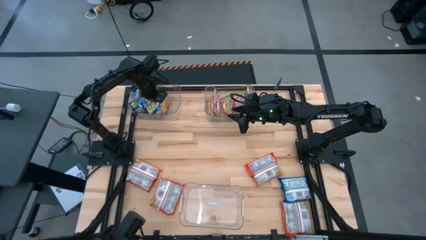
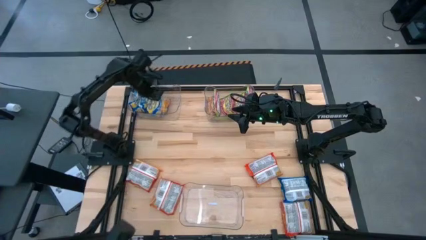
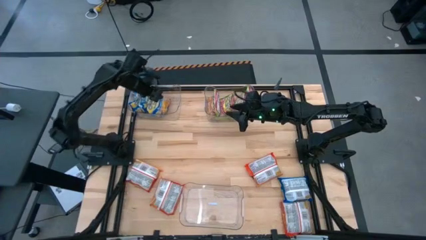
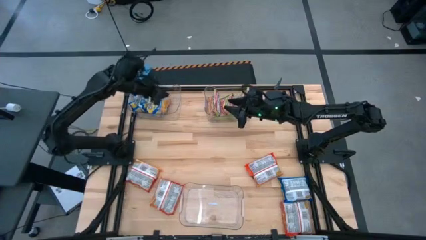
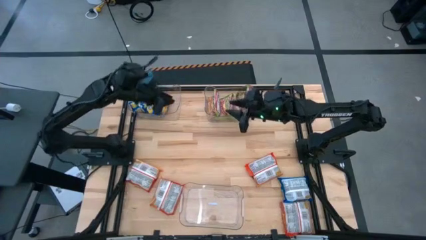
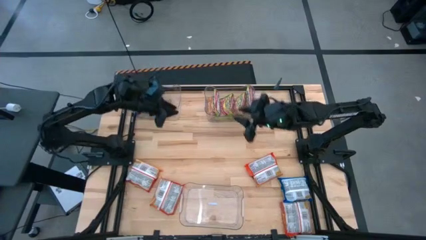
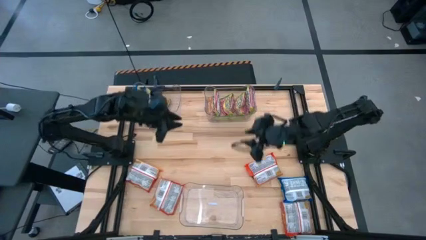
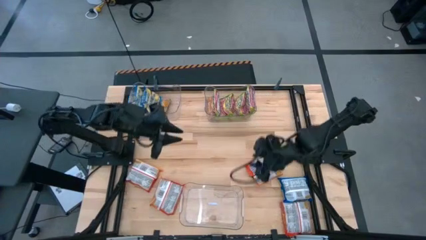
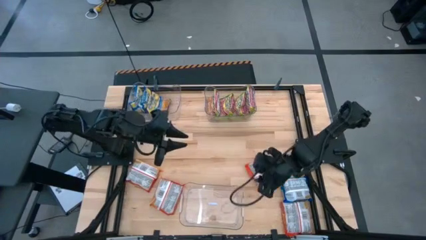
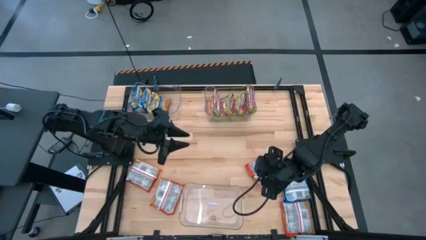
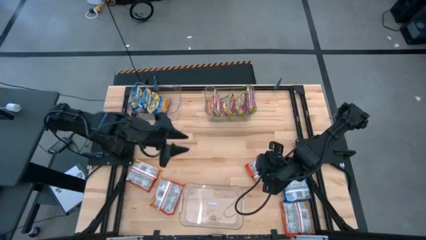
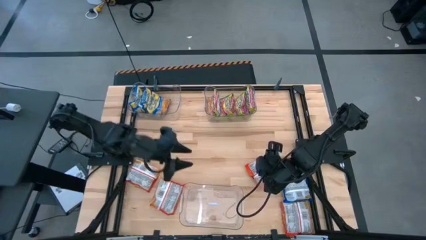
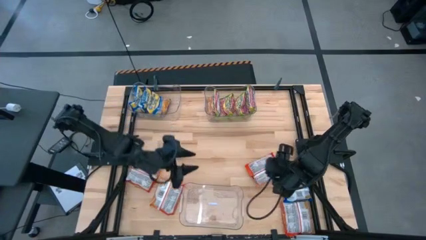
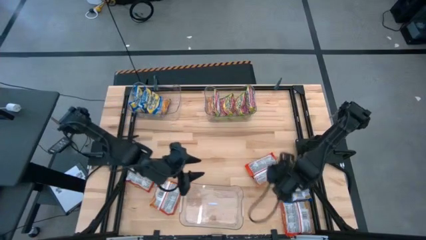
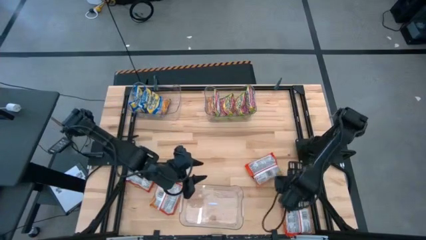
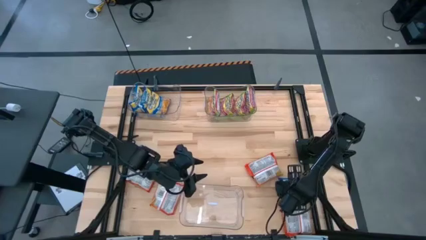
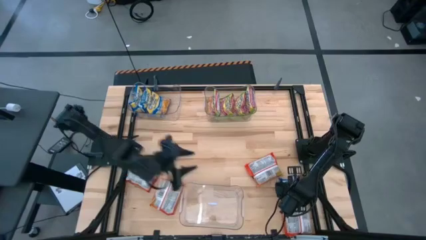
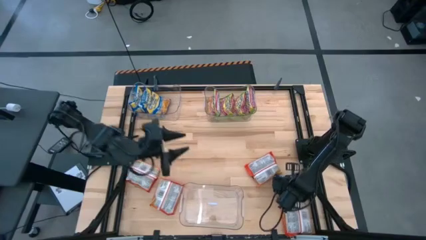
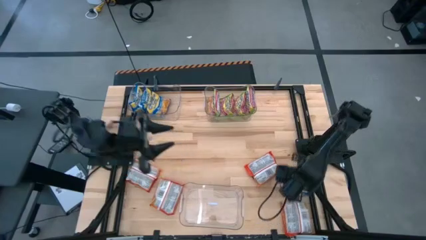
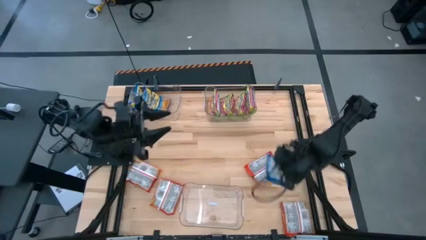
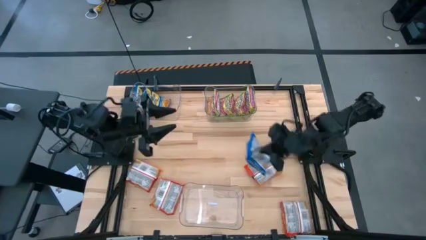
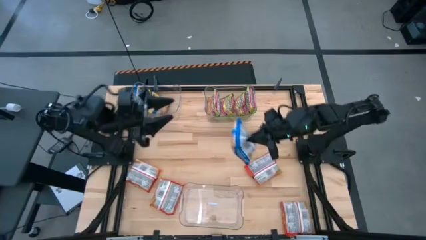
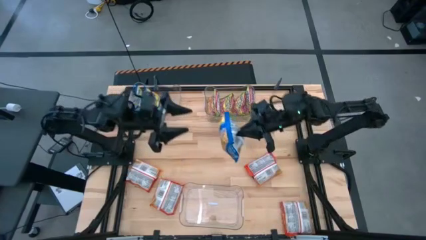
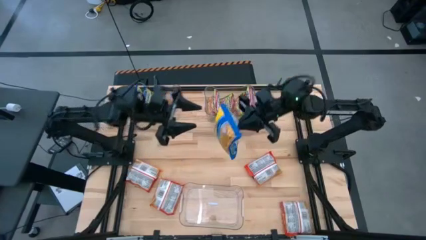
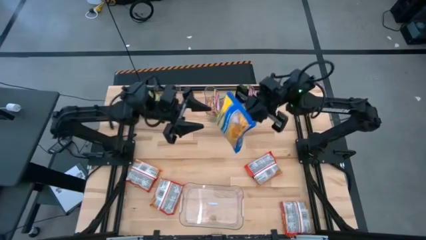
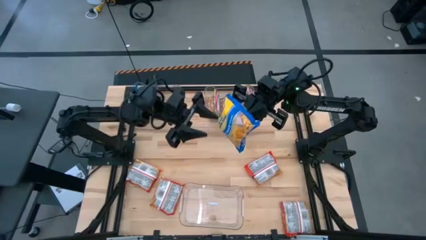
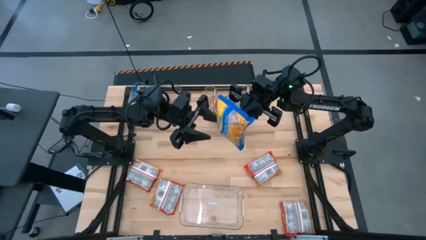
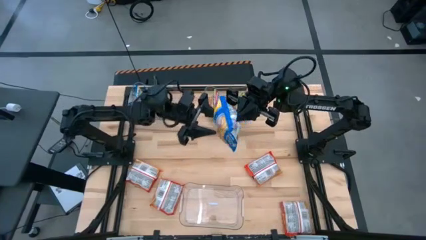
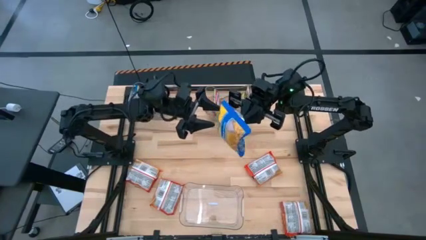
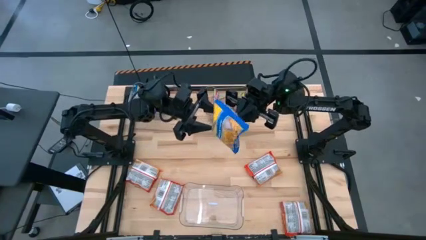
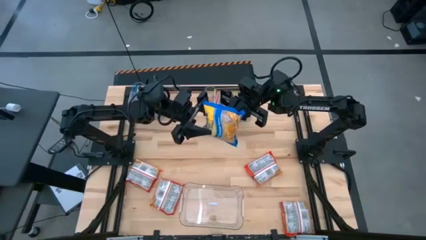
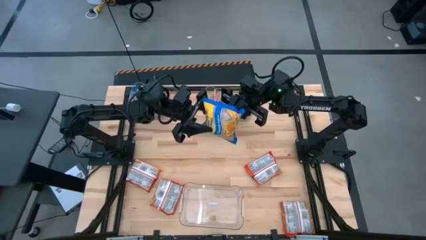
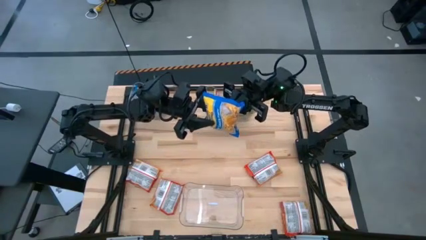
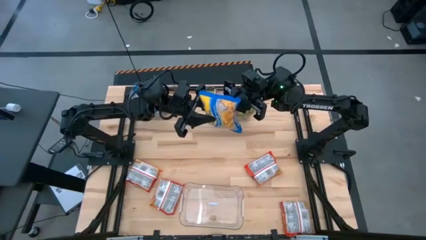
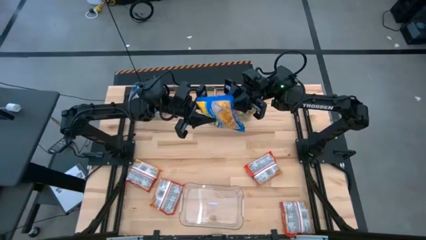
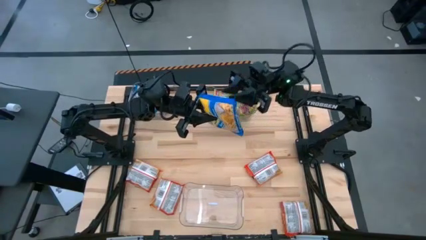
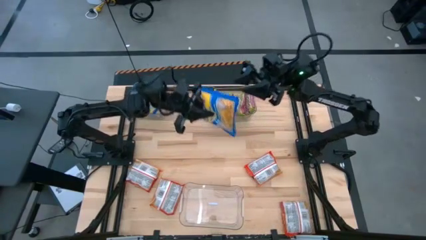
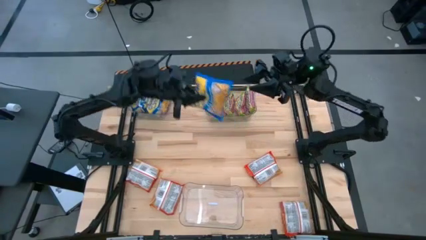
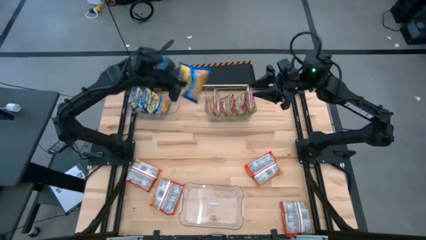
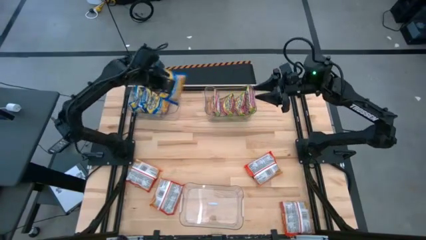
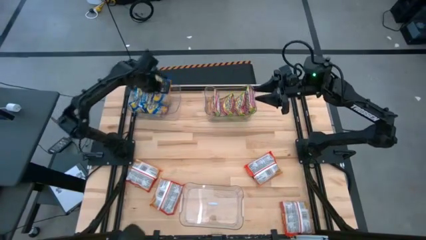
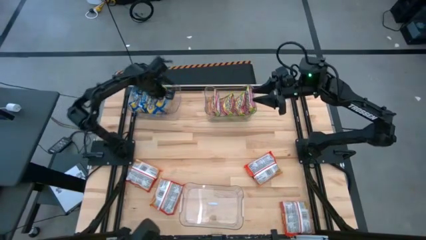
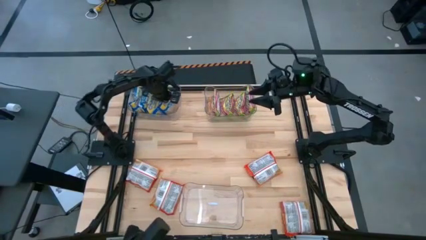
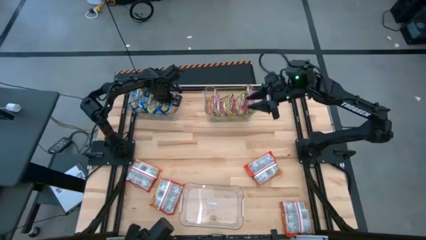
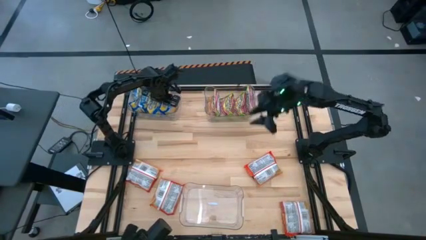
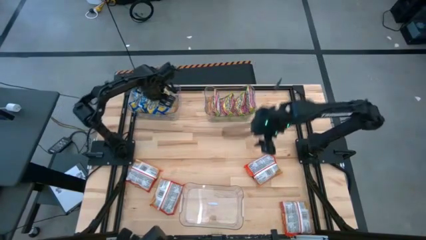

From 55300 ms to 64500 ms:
Task: Sort Maruchan noodles
Put the blue noodle pack into the top left transparent bin

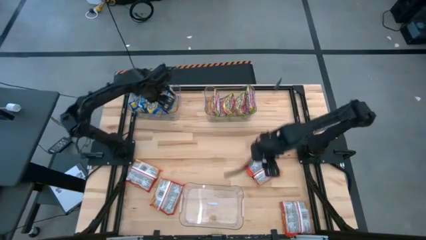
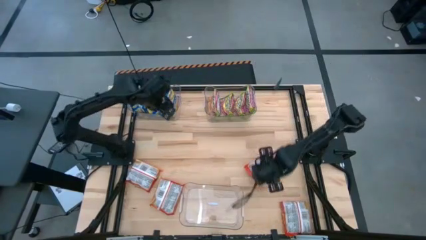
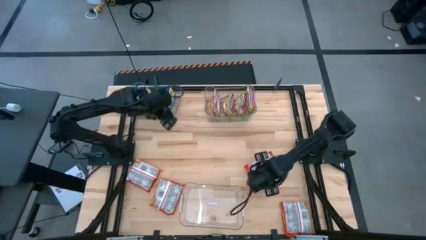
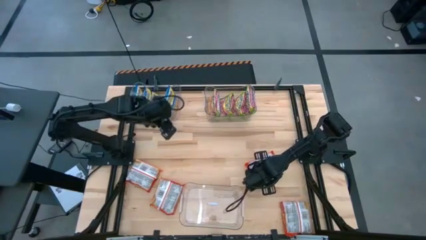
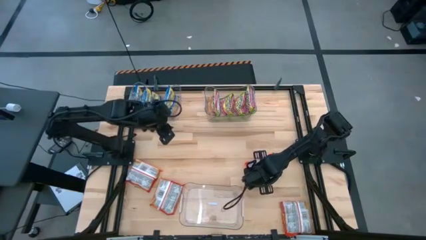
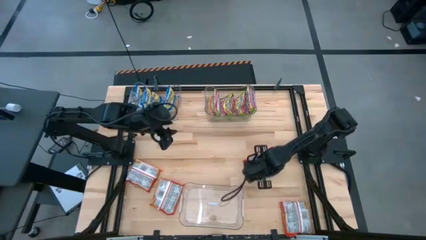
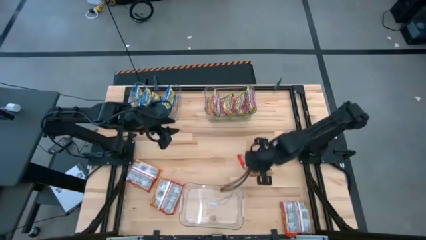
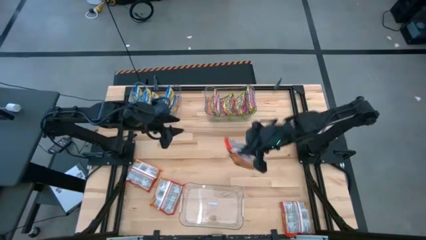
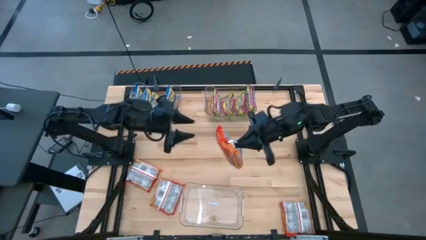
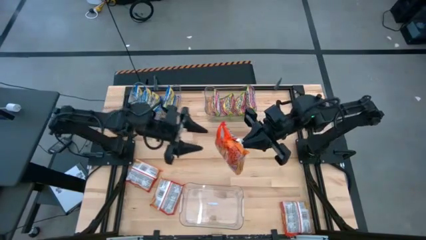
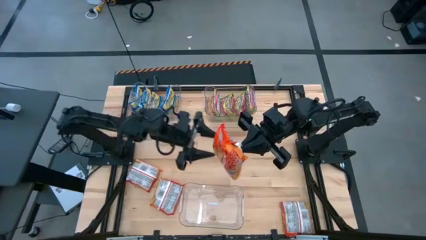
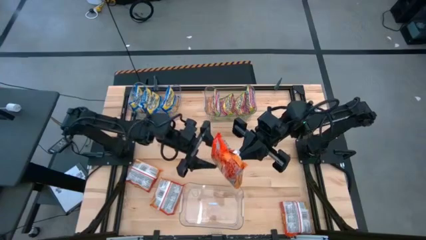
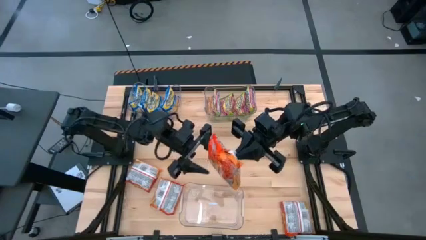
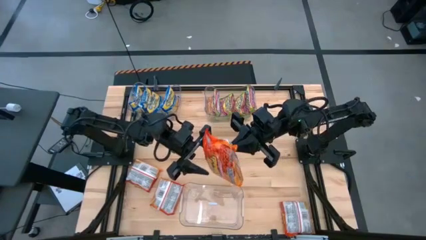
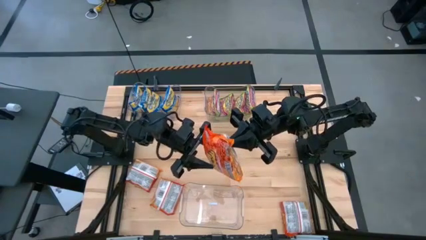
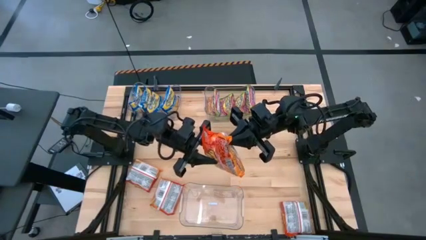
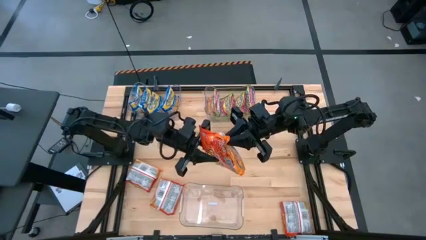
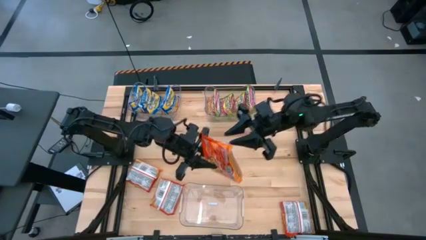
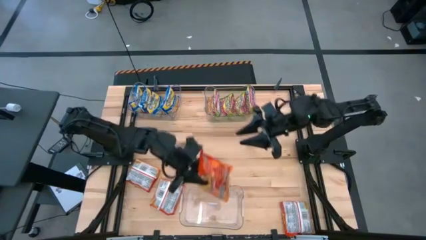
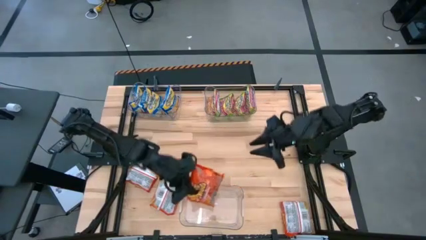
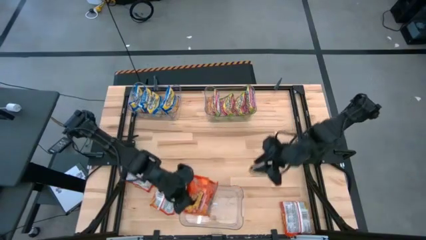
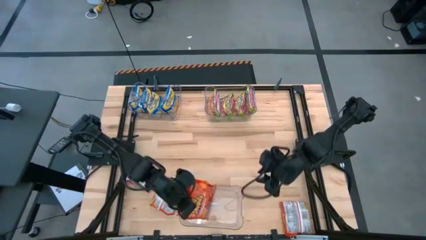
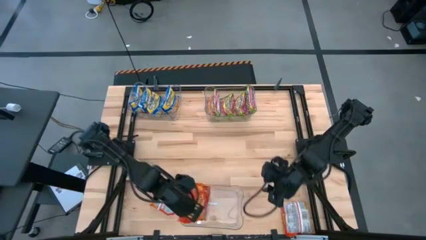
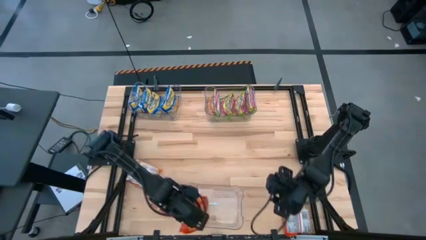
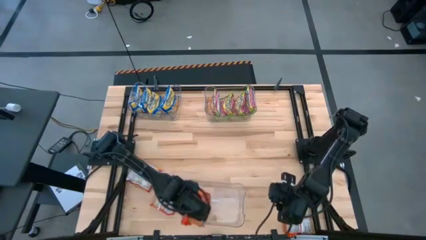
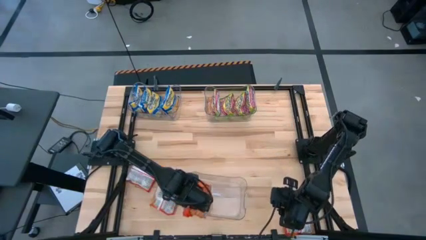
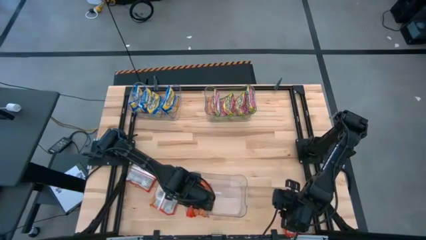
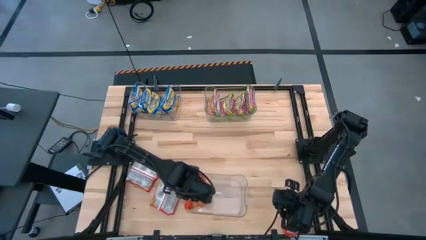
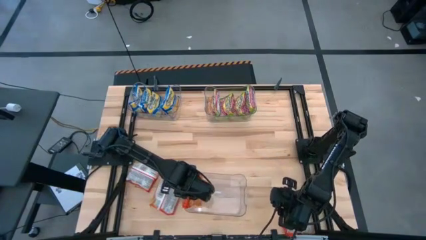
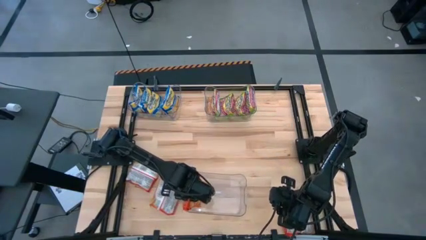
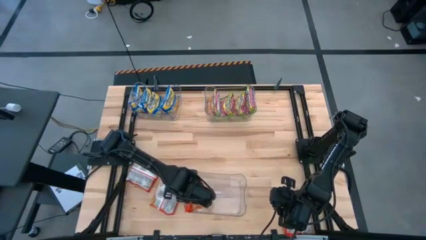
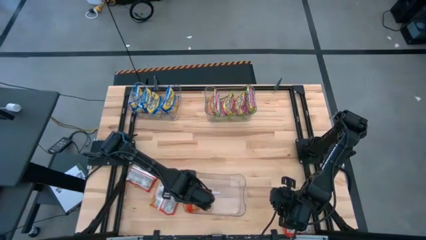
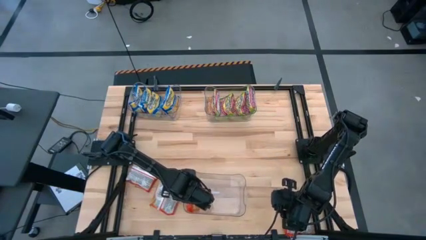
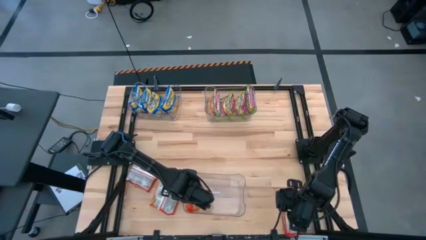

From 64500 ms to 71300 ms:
Put the orange noodle pack into the bottom transparent bin
